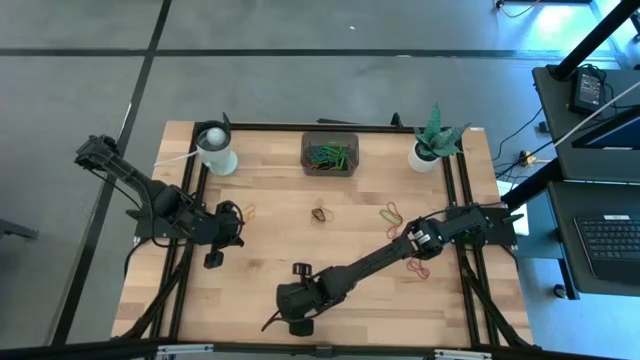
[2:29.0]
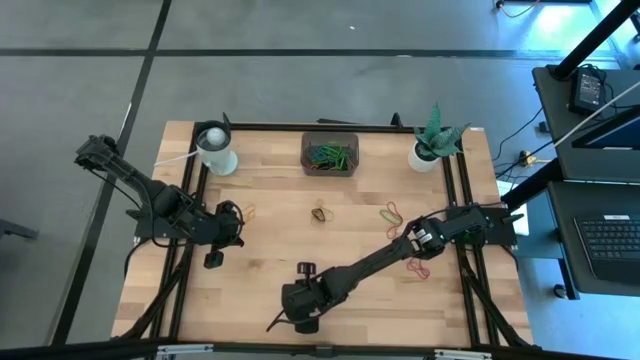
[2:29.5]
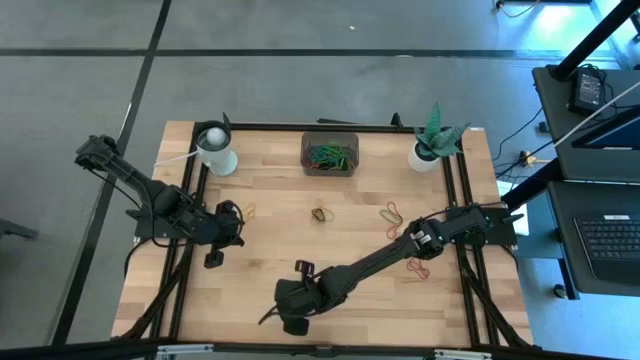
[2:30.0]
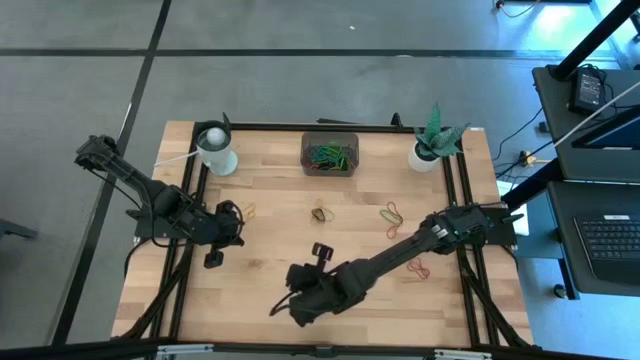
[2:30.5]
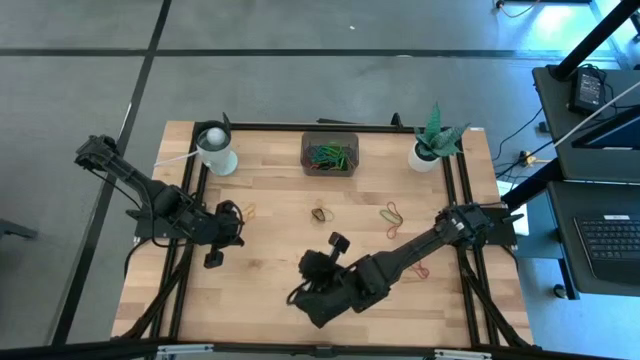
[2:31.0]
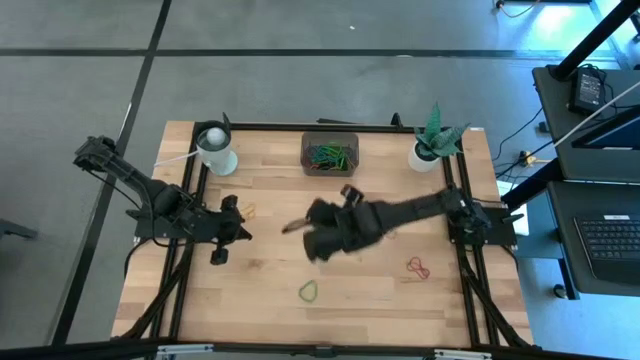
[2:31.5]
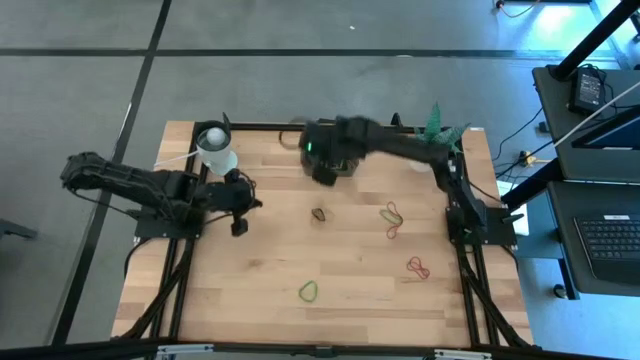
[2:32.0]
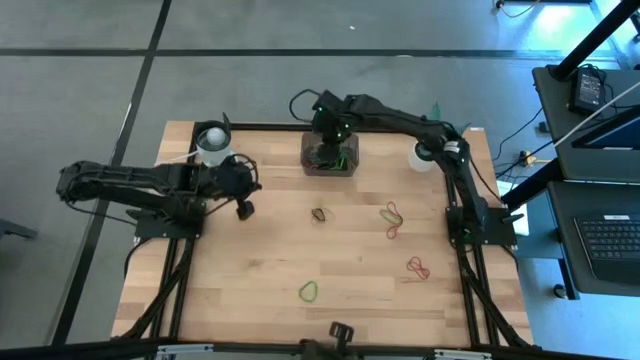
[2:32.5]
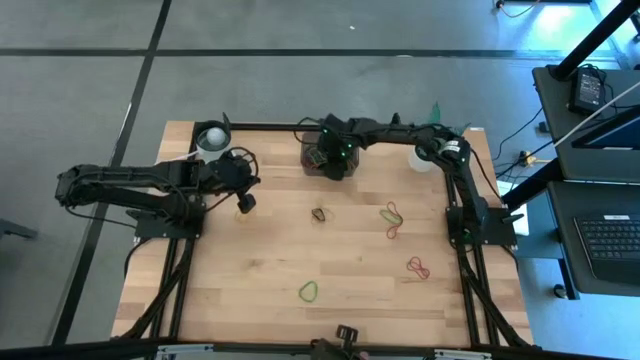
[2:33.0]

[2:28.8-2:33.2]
Task: Pick and place rubber bands into bin
Put the yellow rubber band into the bin

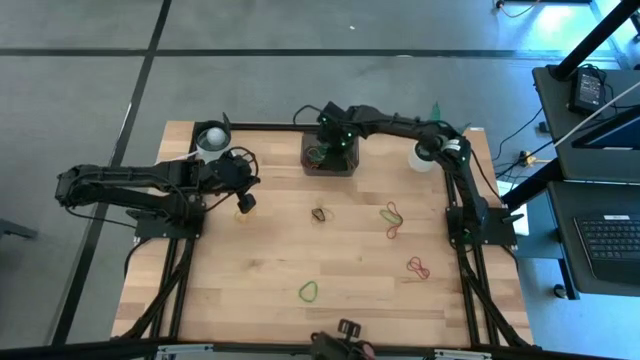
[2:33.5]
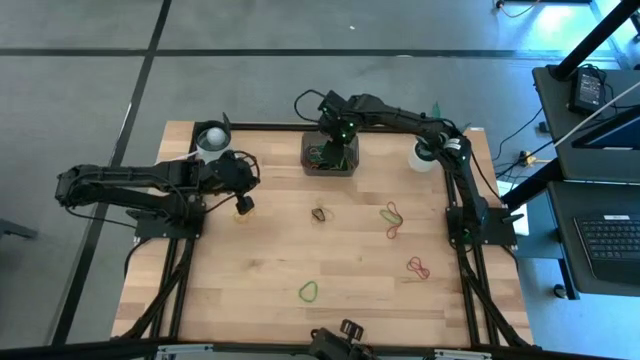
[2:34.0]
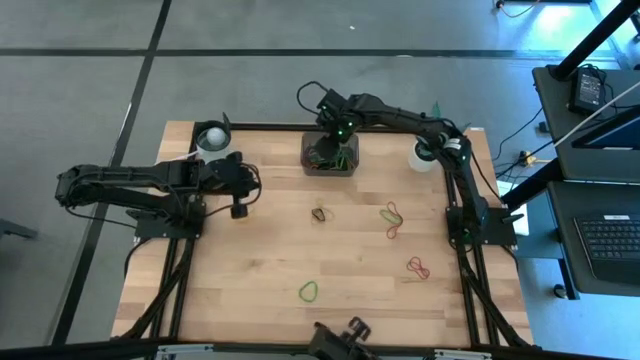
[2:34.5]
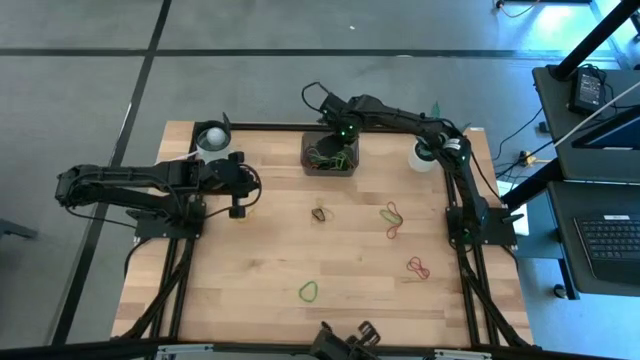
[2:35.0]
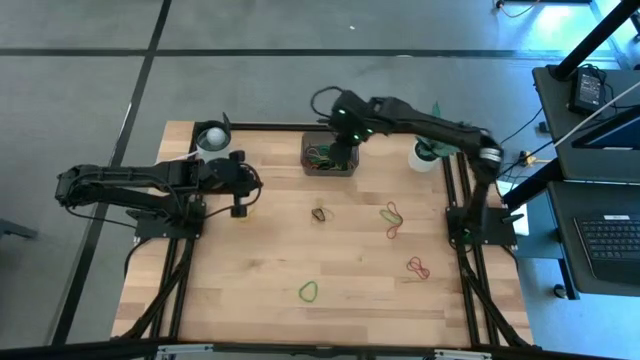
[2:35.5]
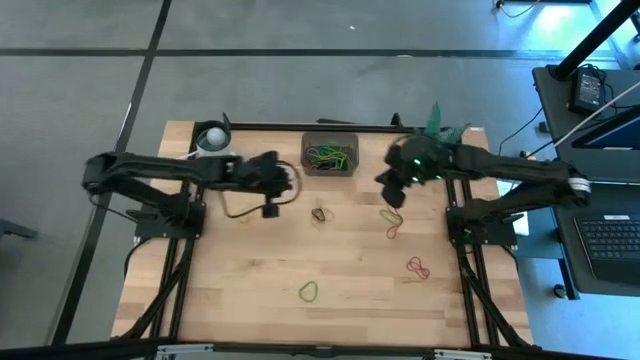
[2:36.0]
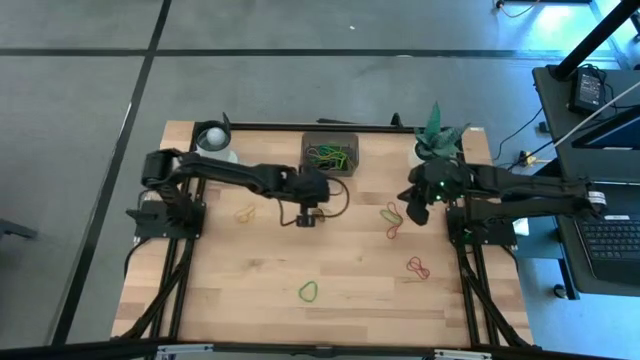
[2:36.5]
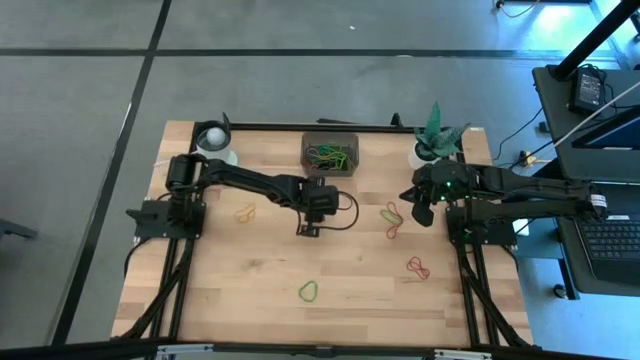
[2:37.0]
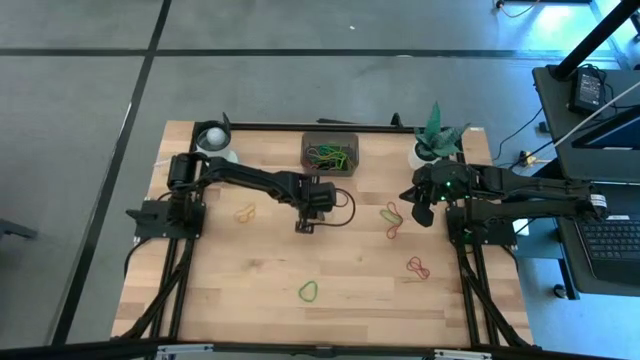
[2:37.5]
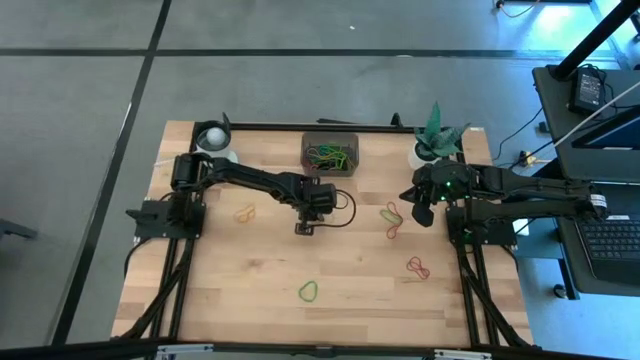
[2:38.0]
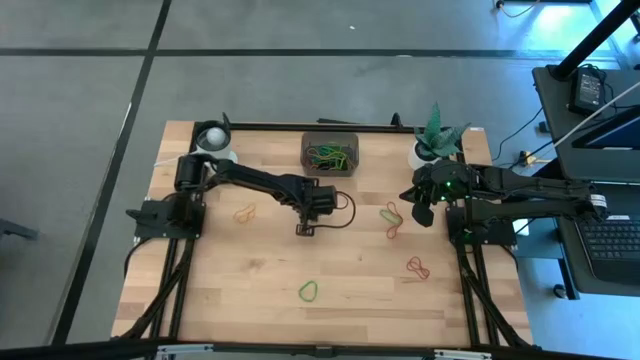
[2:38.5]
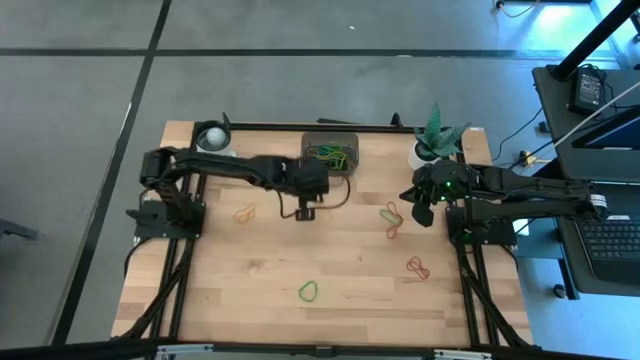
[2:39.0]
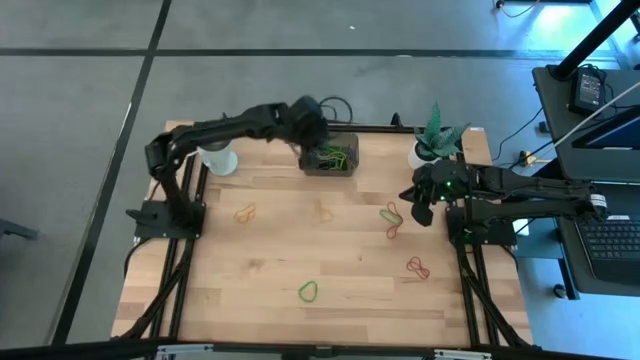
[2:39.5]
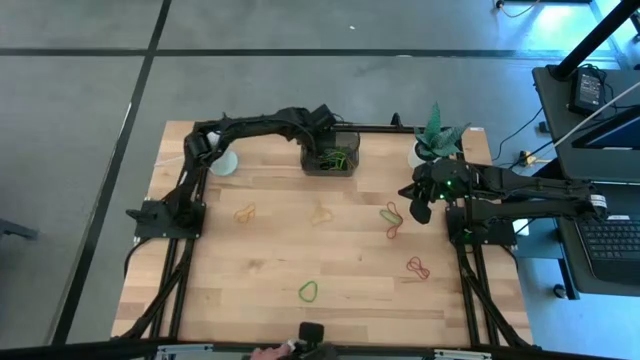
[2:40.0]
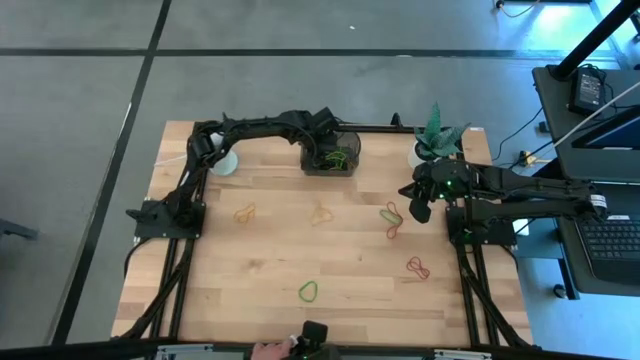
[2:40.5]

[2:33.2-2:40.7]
Put the black rubber band into the bin

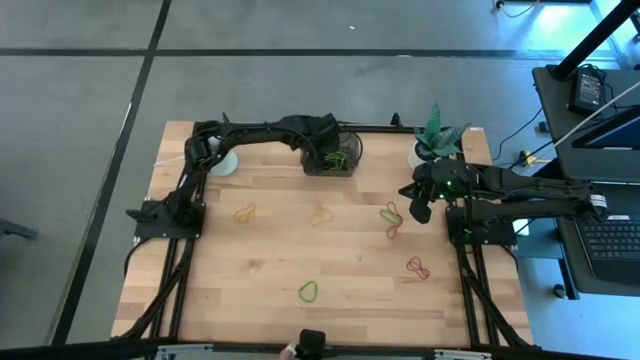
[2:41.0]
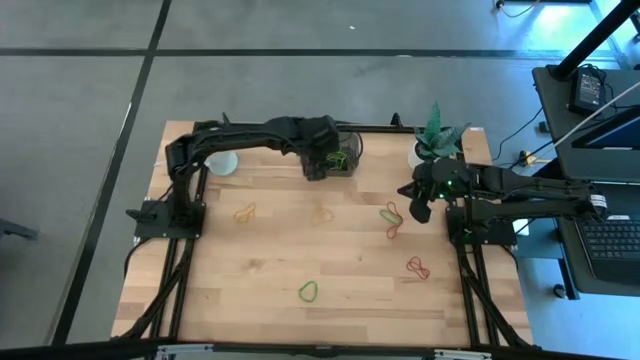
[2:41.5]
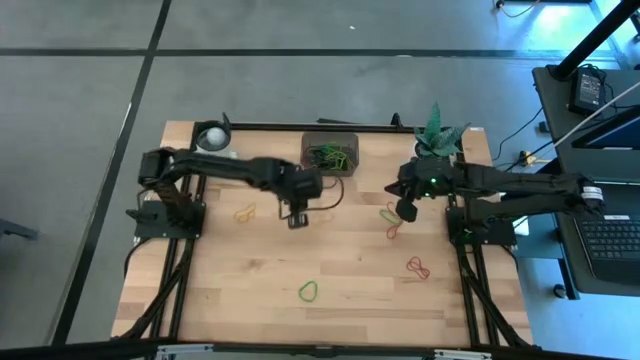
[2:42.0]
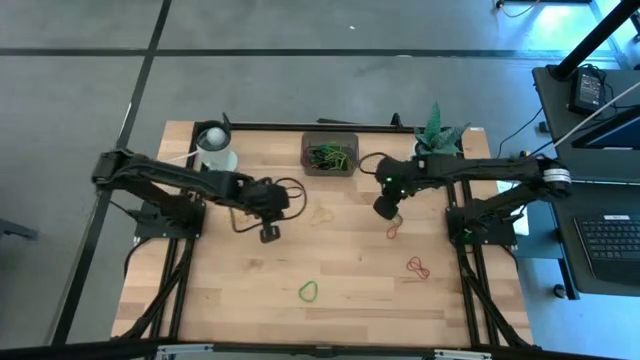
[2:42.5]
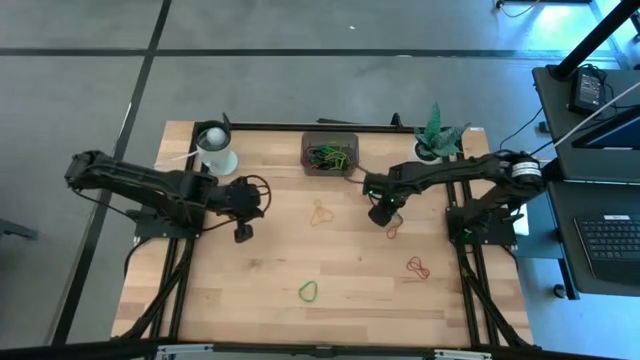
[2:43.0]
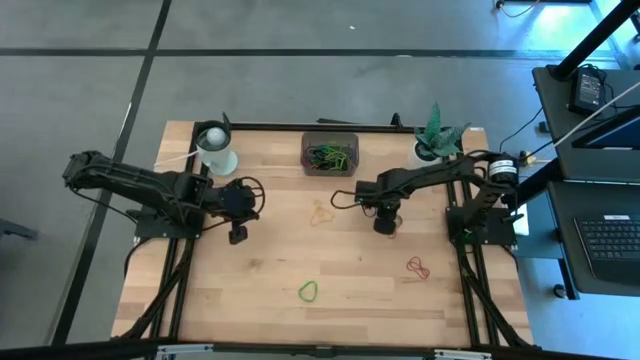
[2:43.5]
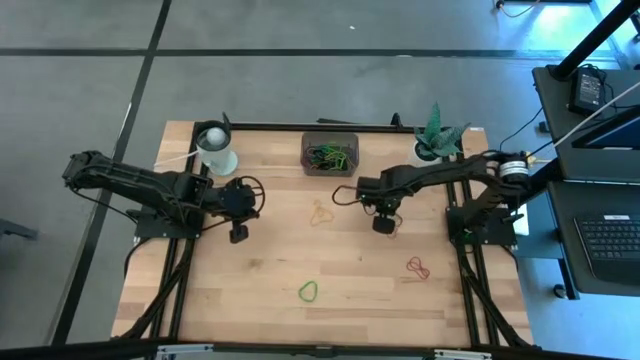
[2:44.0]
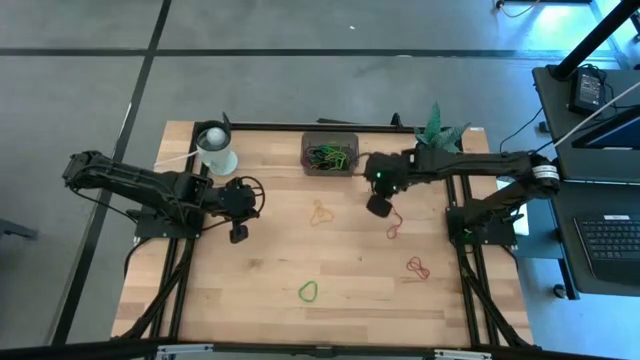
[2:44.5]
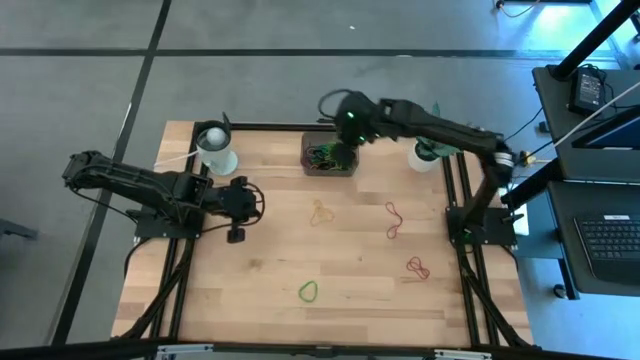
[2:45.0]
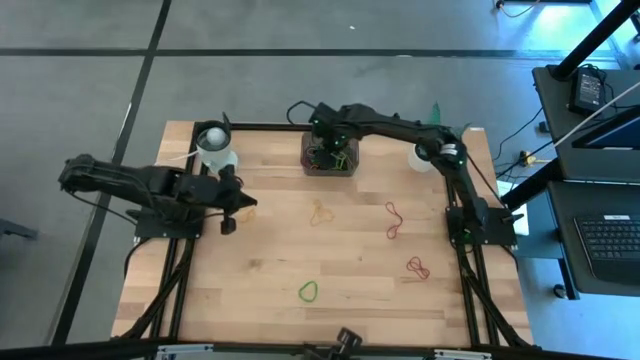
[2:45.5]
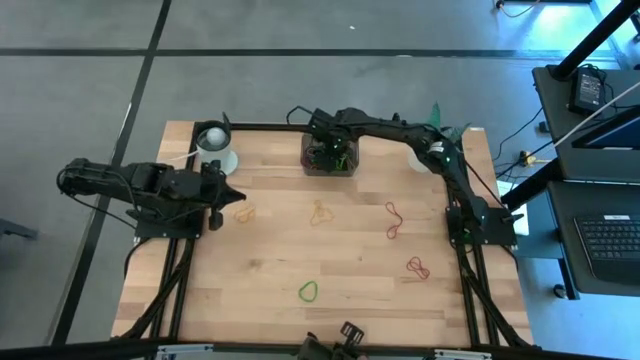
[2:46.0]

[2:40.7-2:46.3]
Put the green rubber band into the bin

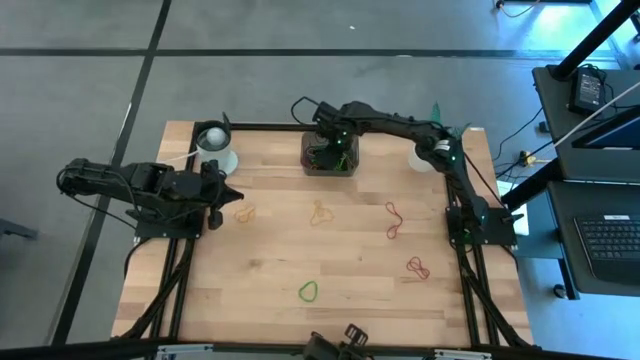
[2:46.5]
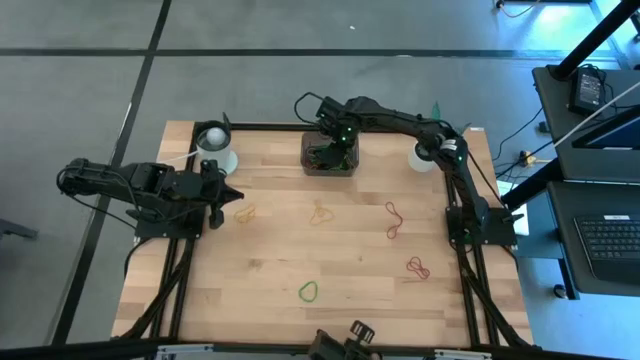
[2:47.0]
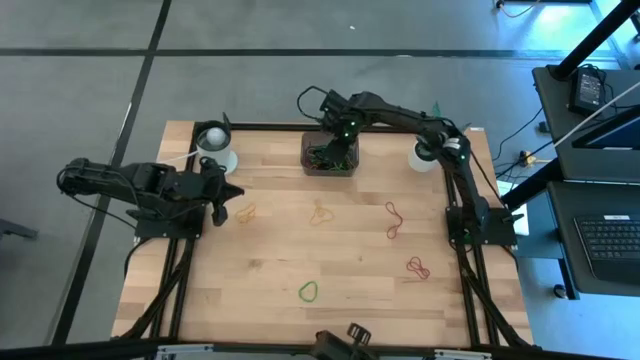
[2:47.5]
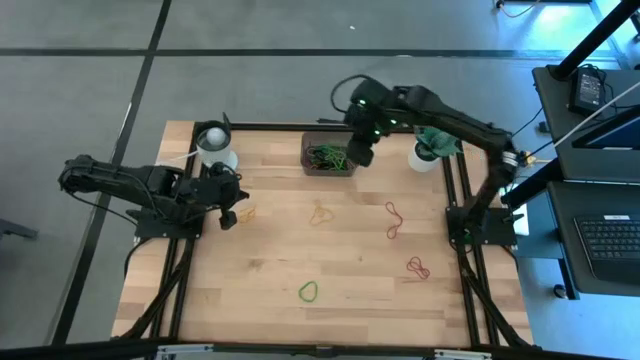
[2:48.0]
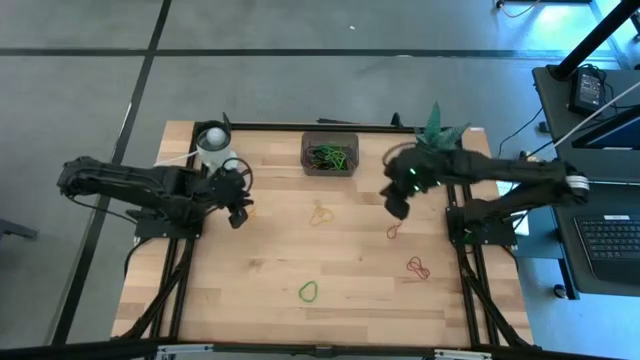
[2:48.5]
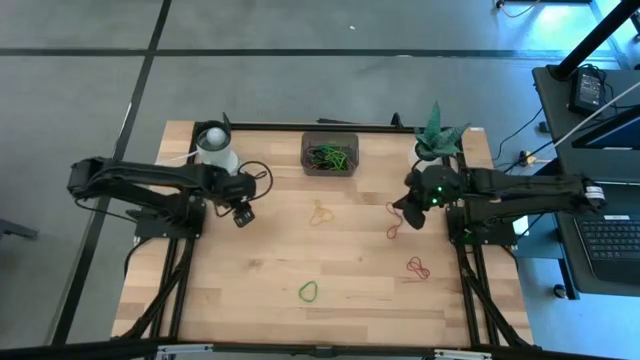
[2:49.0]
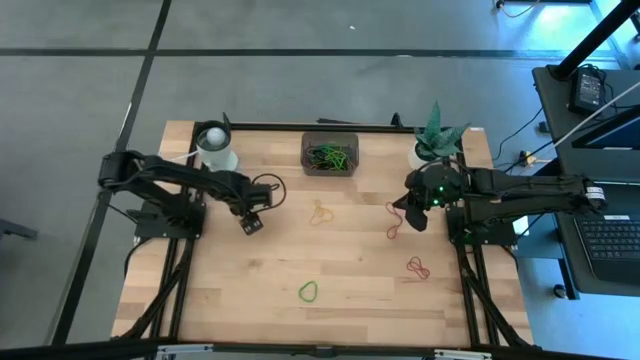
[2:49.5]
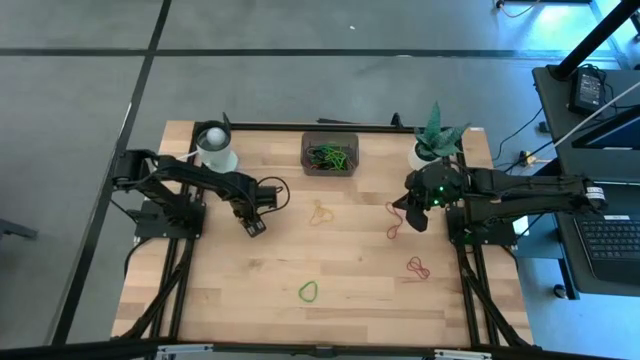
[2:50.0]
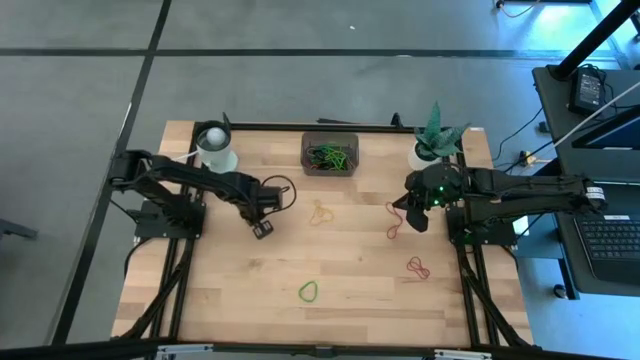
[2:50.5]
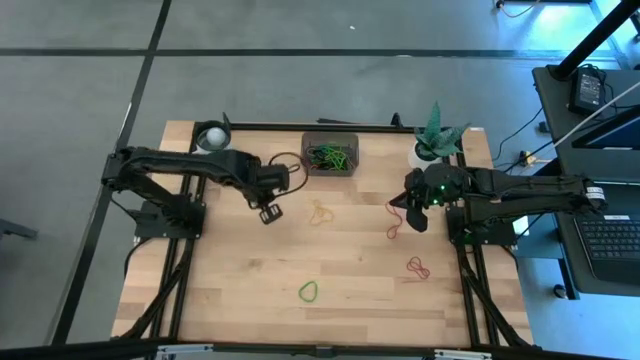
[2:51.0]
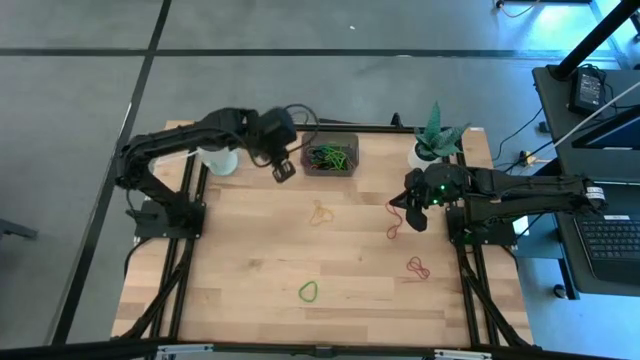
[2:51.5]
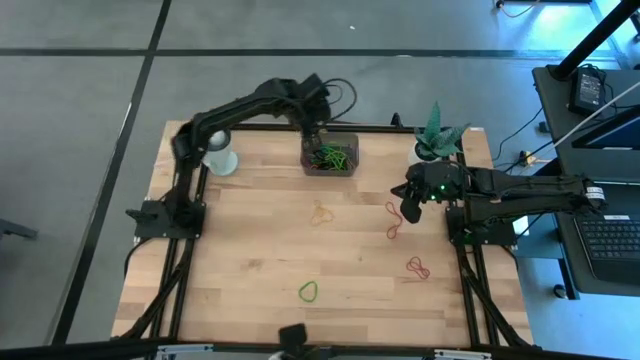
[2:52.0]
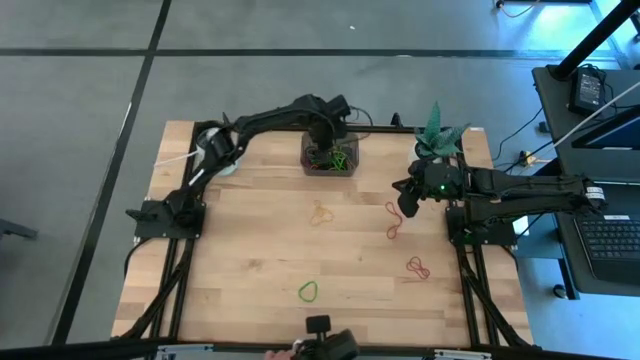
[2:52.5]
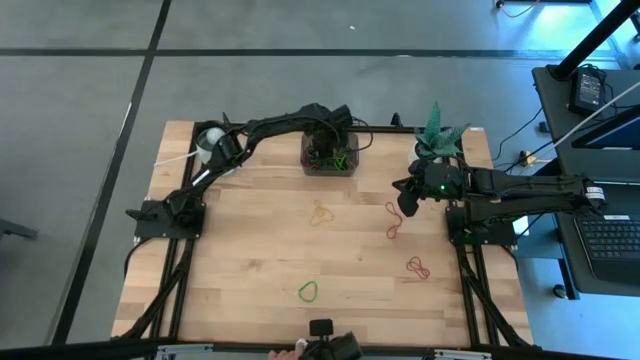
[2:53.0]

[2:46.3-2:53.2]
Put the yellow rubber band into the bin
